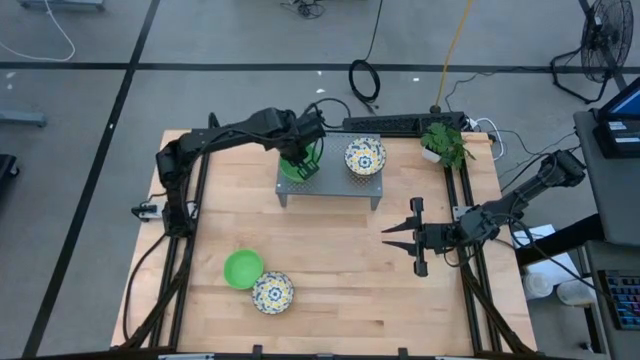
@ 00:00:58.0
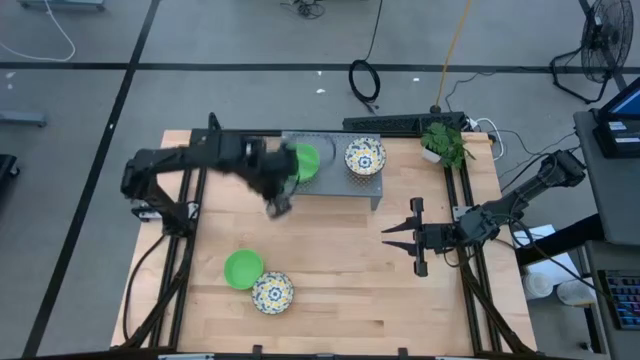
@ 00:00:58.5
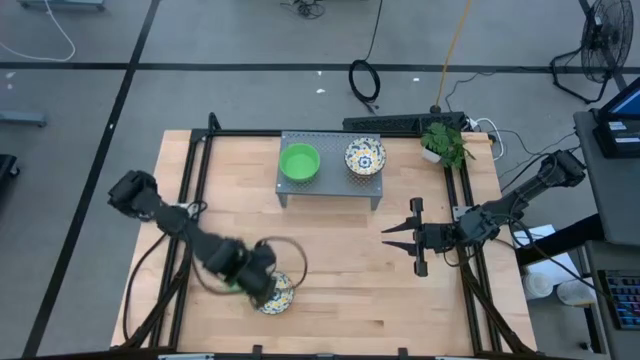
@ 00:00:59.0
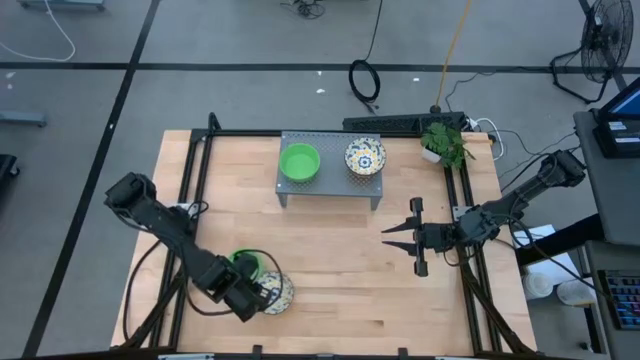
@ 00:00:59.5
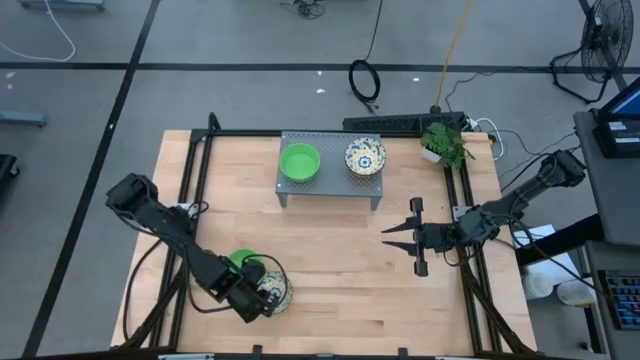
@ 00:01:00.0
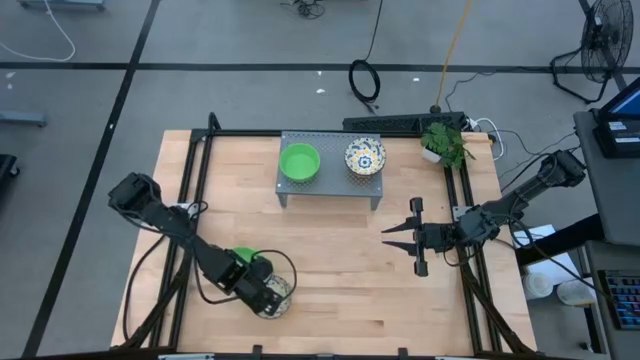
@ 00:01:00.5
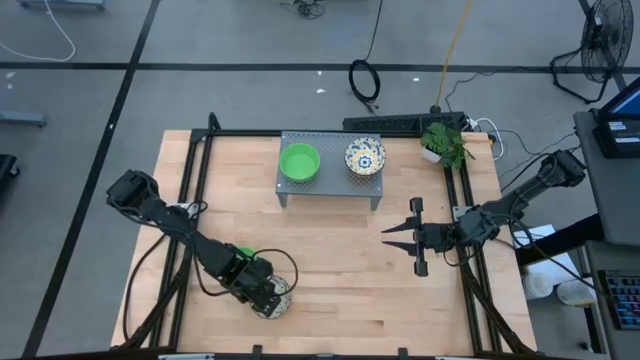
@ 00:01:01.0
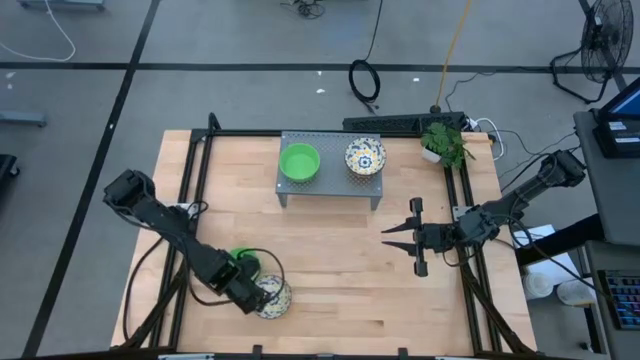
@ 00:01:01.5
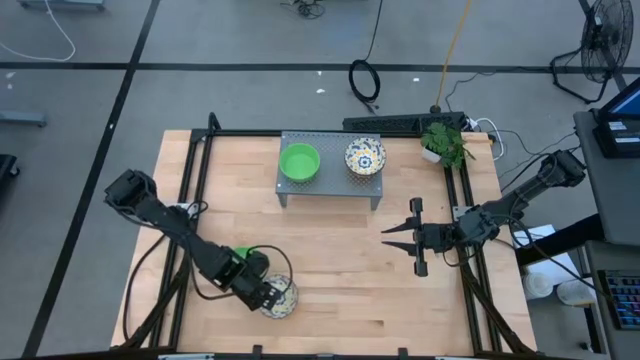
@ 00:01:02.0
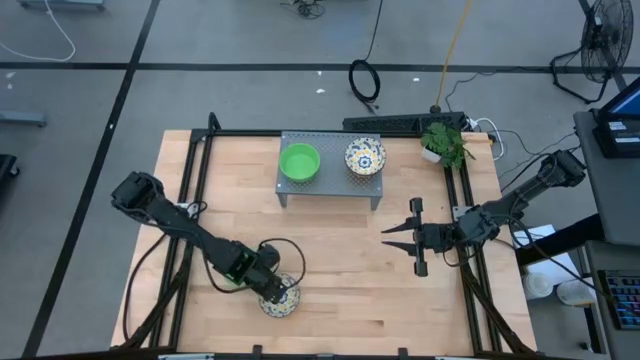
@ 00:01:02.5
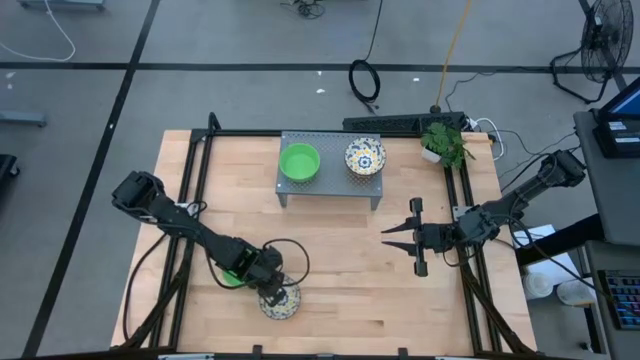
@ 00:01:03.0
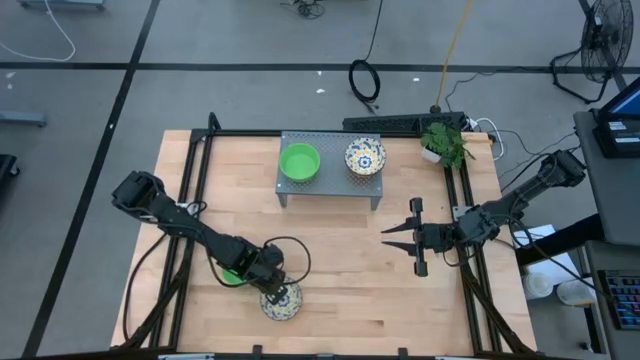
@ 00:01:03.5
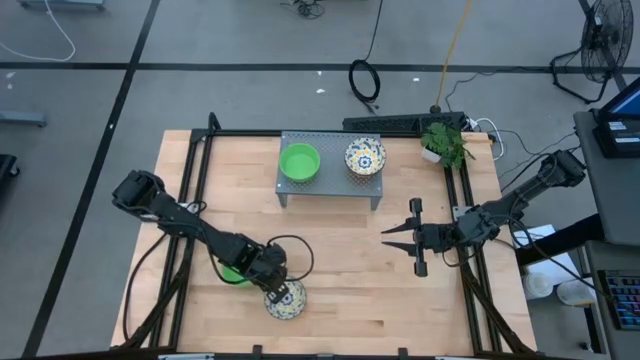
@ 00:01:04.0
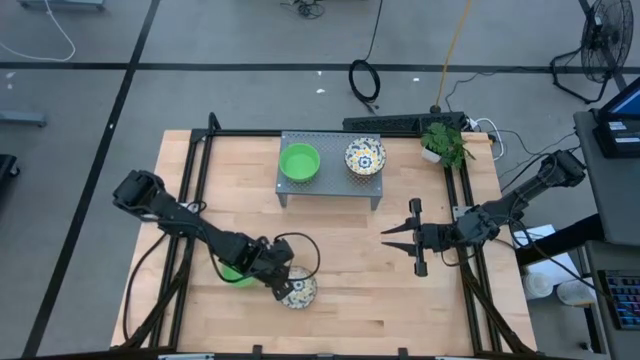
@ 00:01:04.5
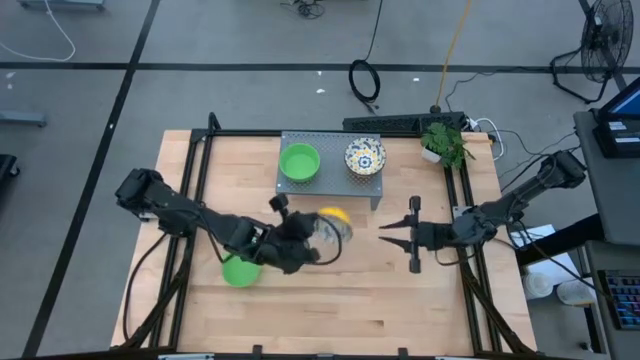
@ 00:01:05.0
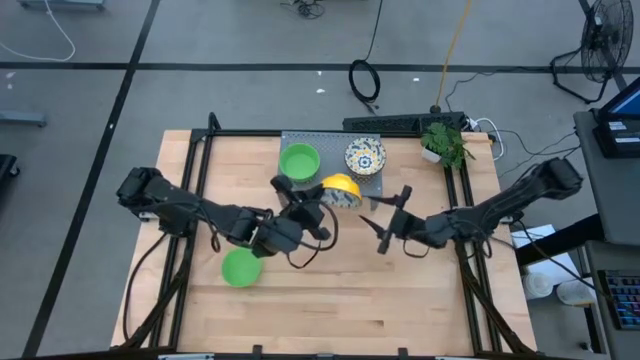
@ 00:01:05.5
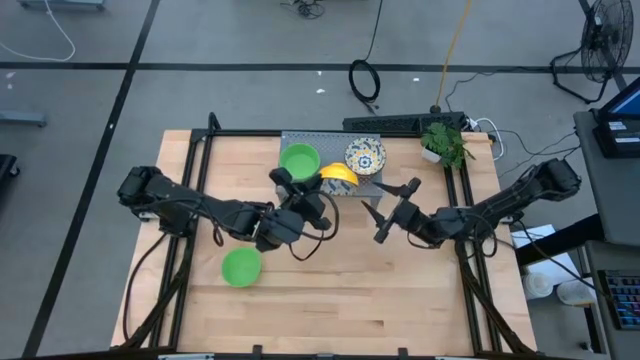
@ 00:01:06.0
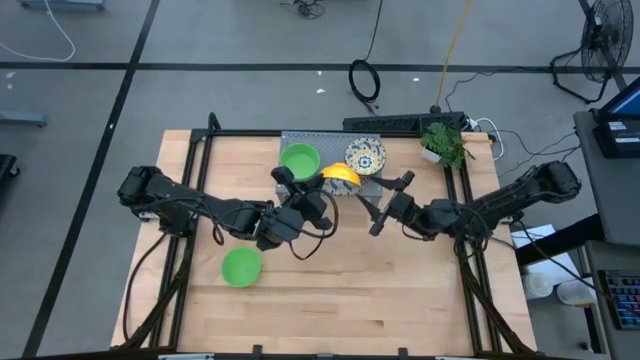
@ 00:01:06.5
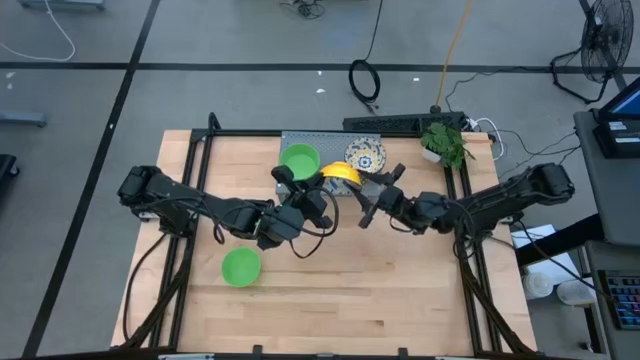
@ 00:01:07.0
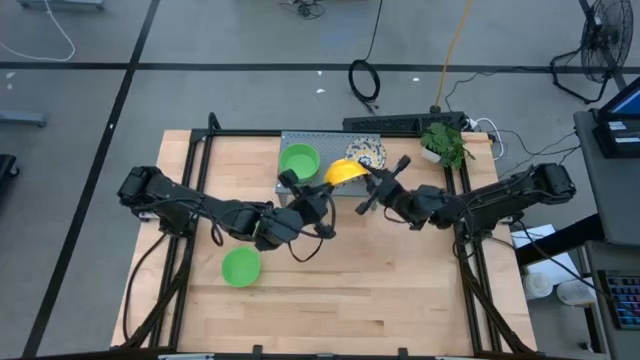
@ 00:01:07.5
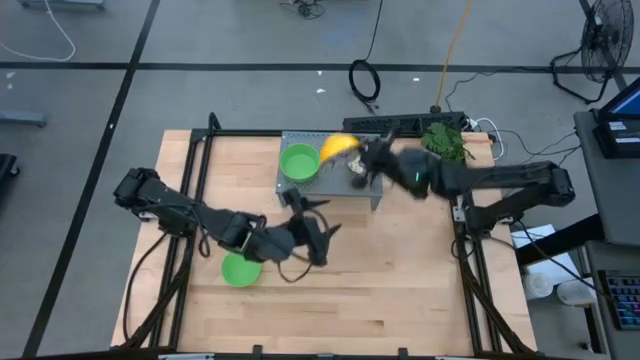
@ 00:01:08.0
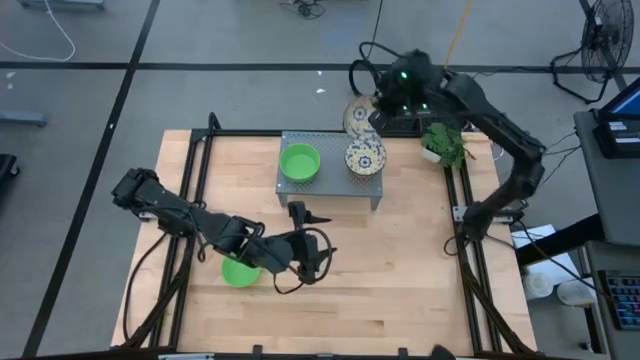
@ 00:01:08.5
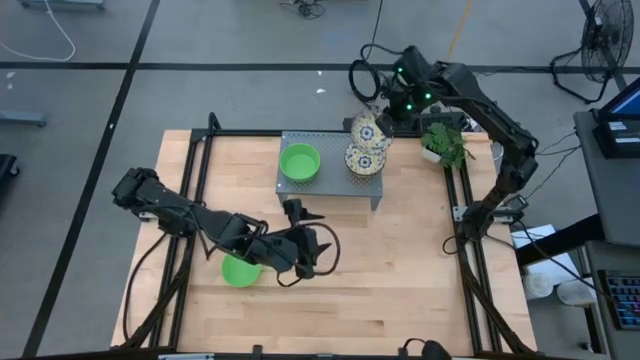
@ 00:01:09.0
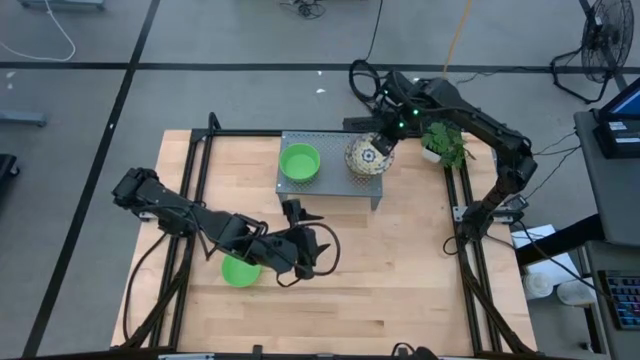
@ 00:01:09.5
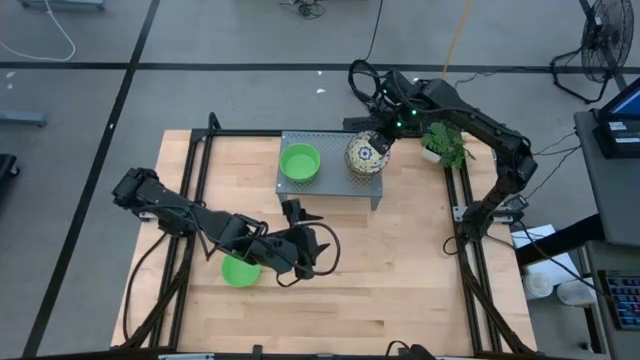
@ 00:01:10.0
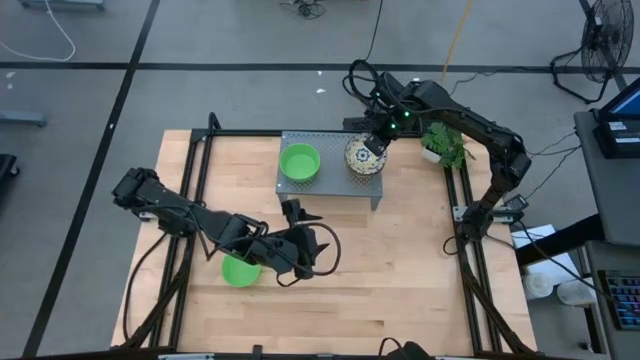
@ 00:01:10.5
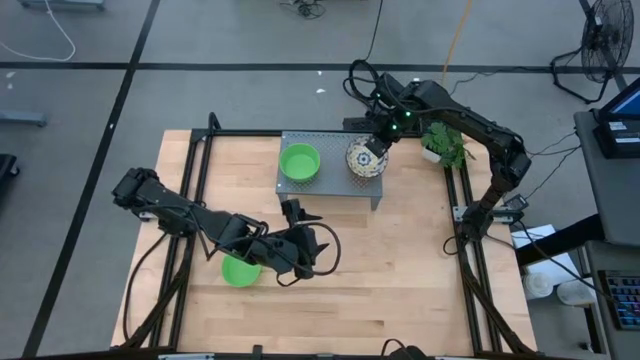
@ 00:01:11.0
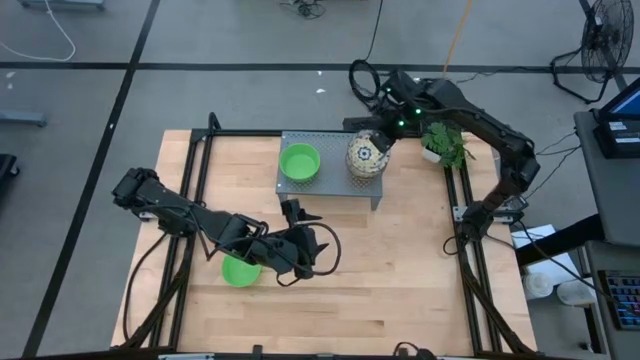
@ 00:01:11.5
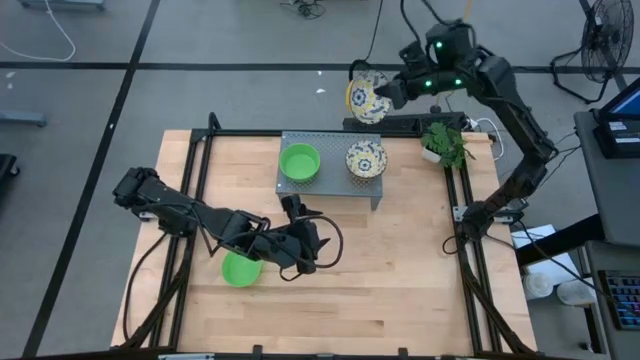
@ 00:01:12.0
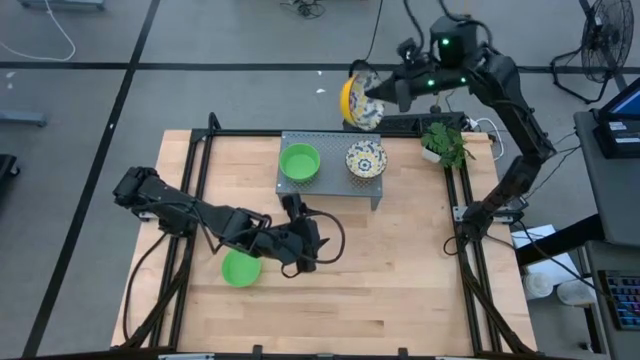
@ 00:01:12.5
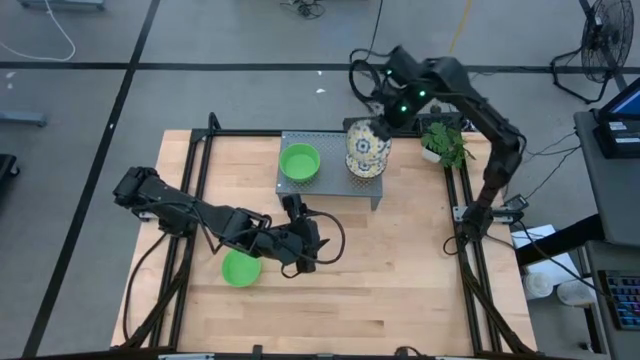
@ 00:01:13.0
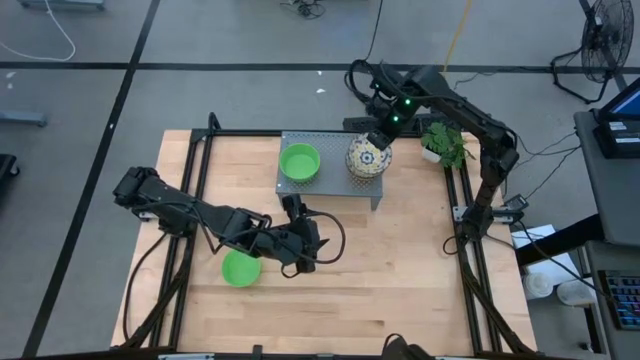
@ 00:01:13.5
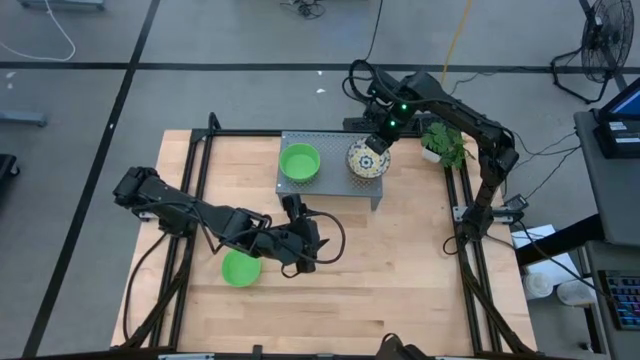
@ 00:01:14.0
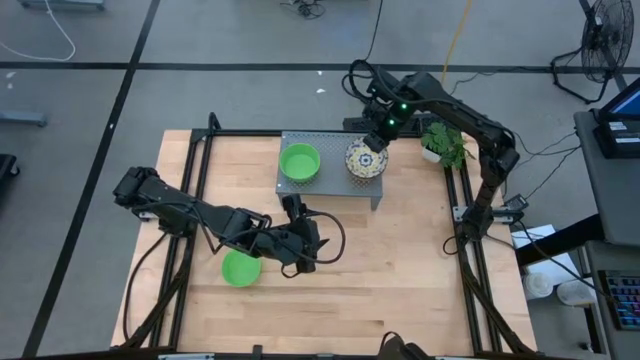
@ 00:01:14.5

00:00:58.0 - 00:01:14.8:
Task: Pick & Place Mini bowls
Stack the white patterned bowl on top of the white patterned bowls on the shelf

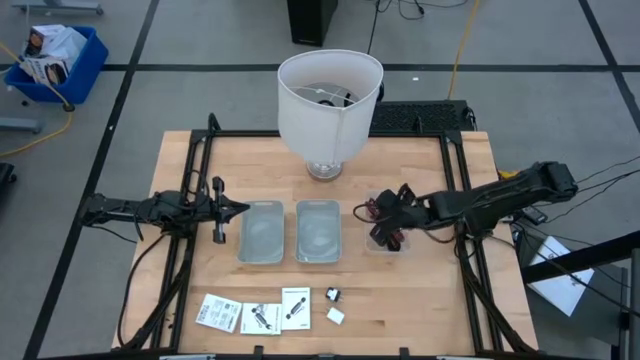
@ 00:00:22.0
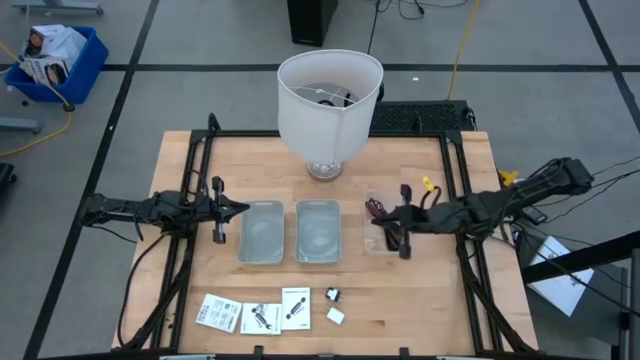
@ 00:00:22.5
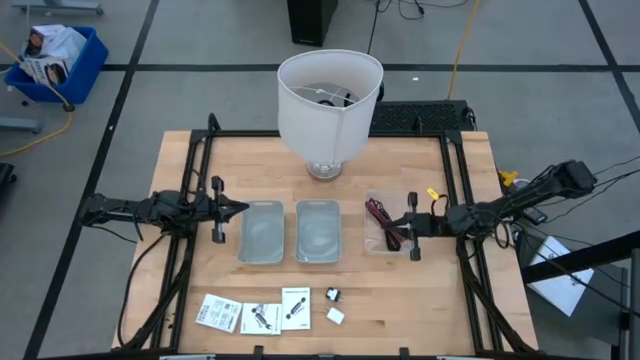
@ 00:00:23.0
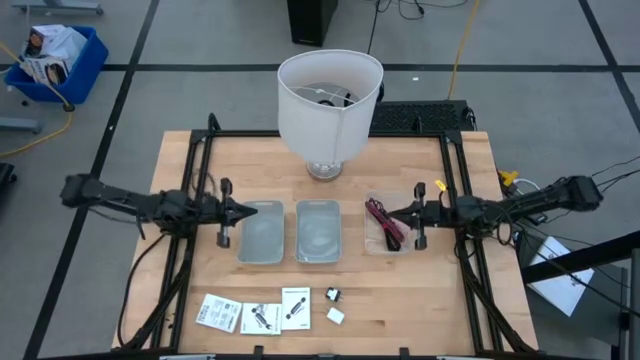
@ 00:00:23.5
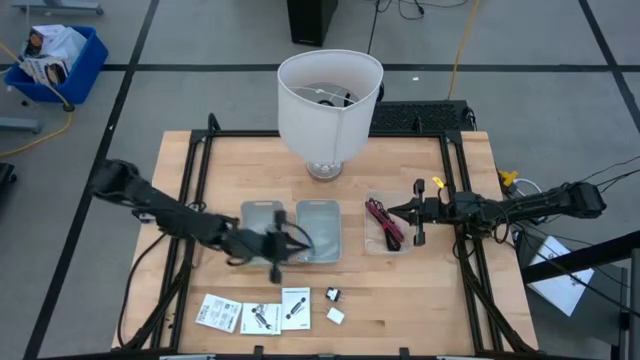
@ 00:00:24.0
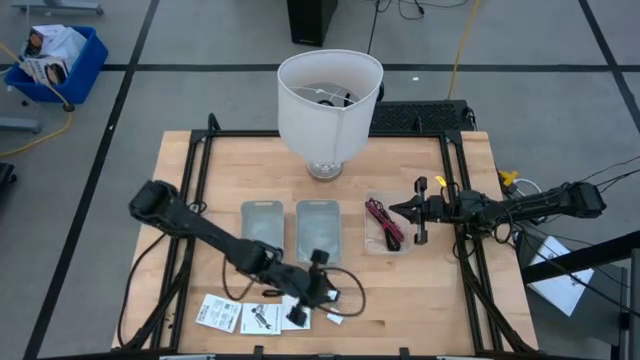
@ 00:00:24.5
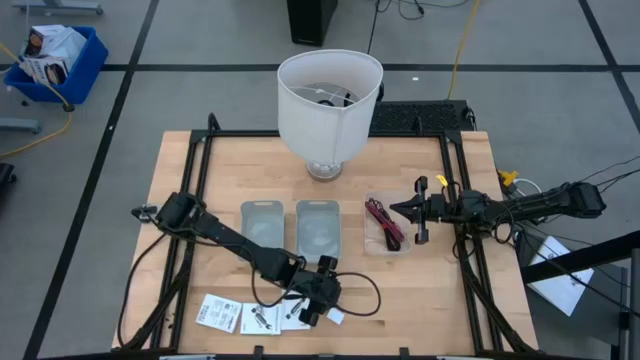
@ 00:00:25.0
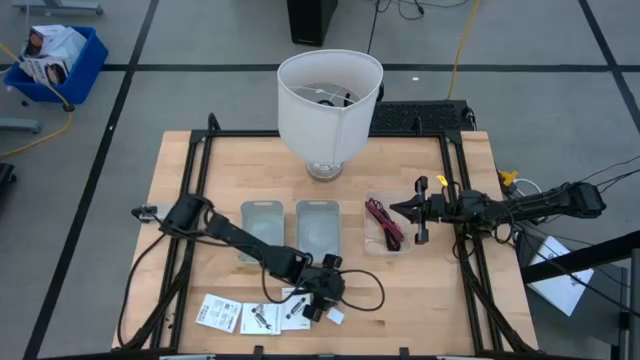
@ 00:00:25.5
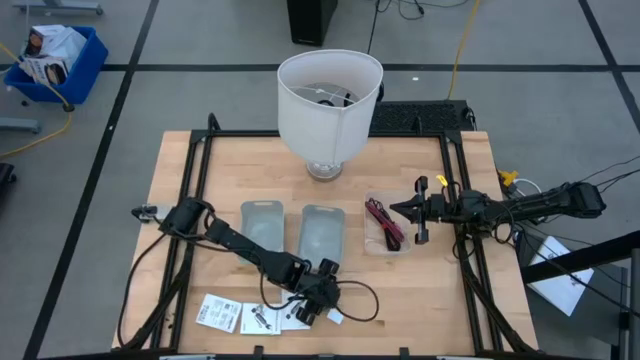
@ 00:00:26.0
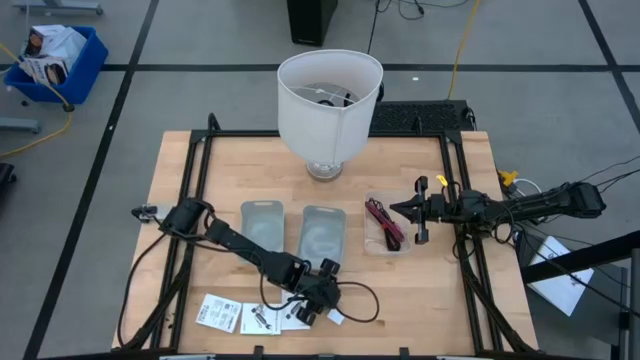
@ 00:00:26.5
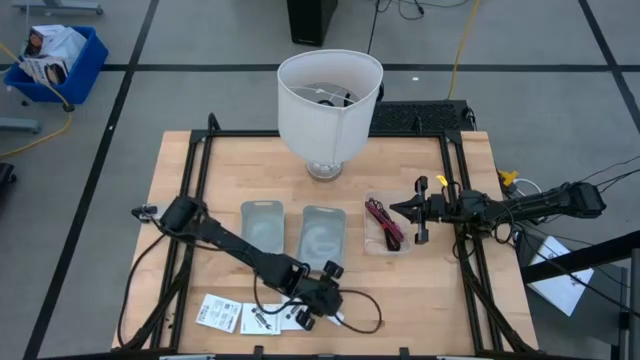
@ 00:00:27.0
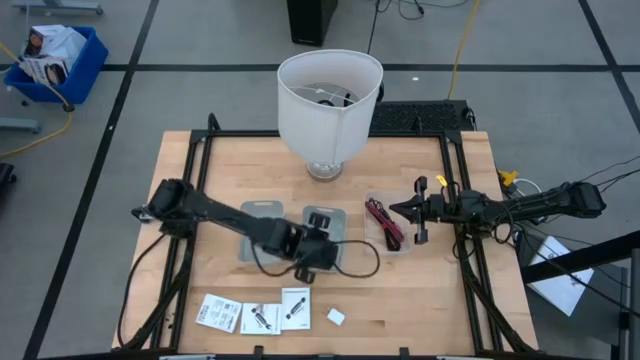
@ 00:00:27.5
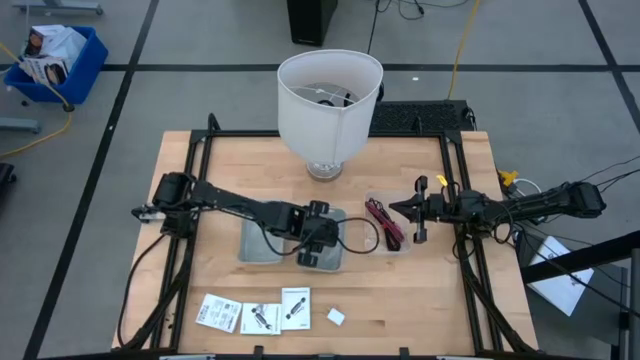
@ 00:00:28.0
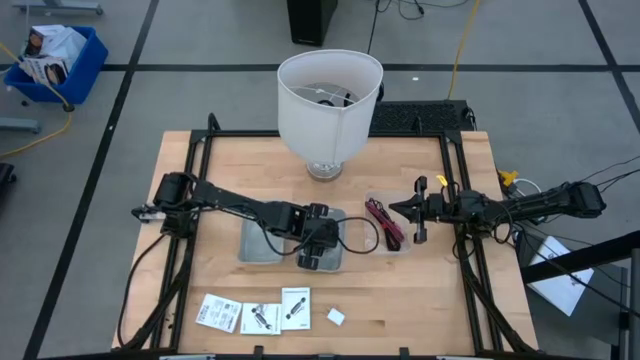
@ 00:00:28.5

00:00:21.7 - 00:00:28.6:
Task: Pick and place items into bin
Put the black charger adapter into the right gray bin
